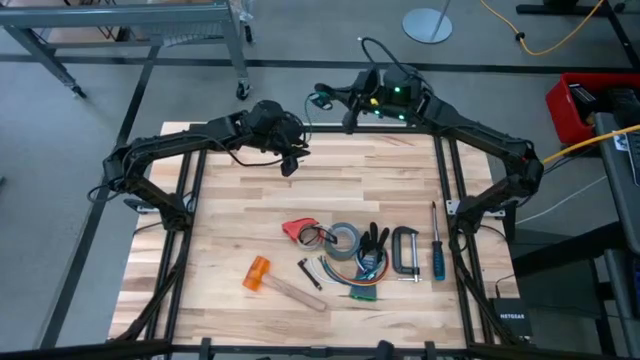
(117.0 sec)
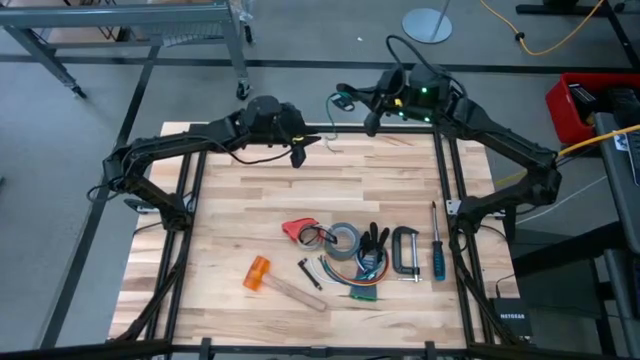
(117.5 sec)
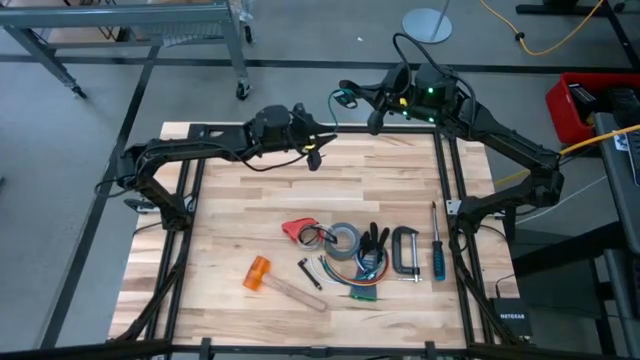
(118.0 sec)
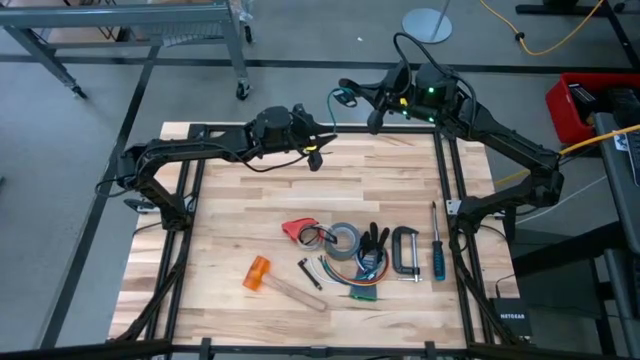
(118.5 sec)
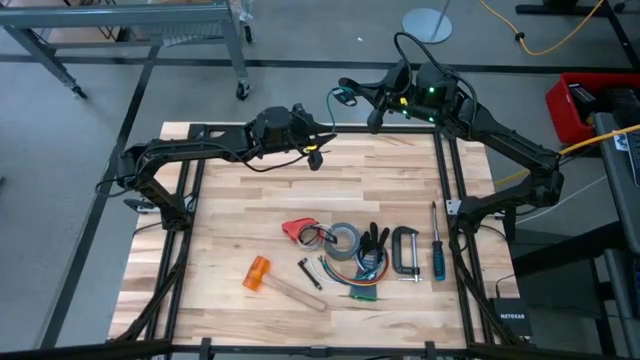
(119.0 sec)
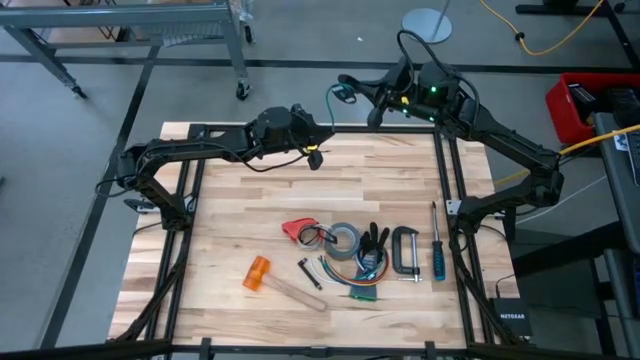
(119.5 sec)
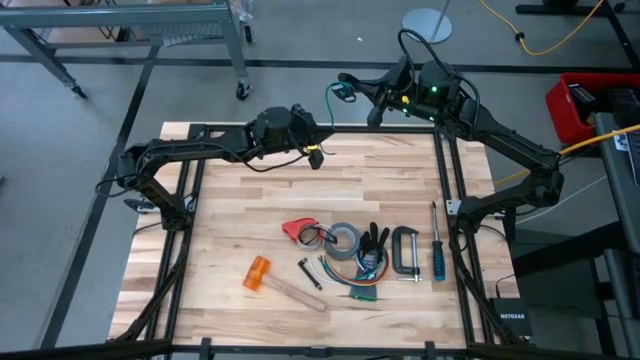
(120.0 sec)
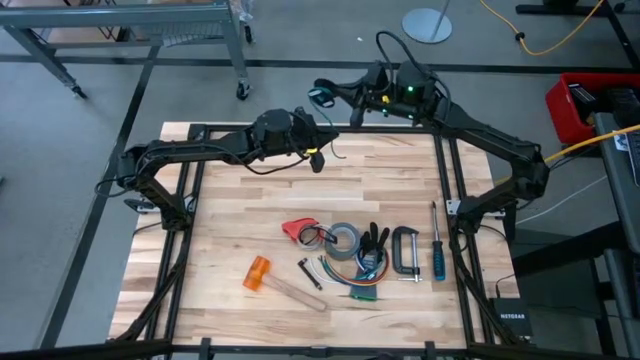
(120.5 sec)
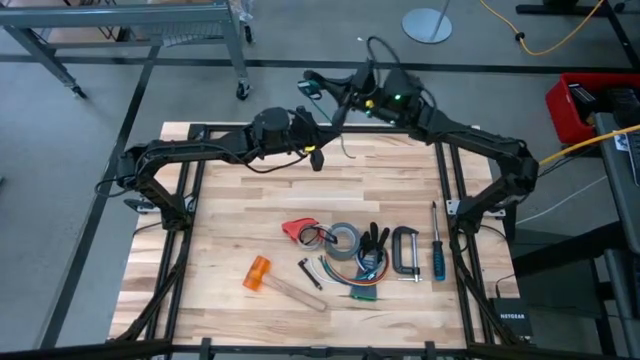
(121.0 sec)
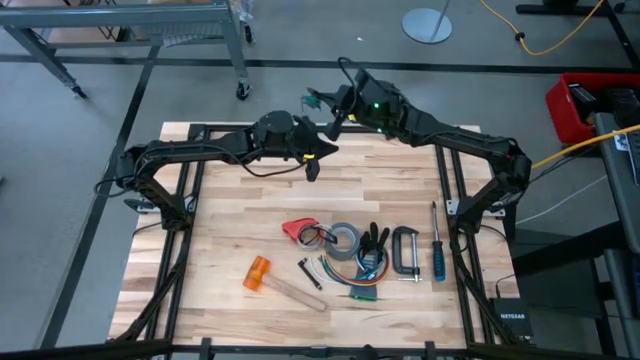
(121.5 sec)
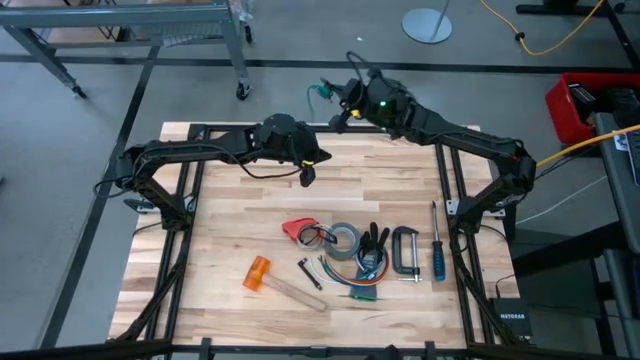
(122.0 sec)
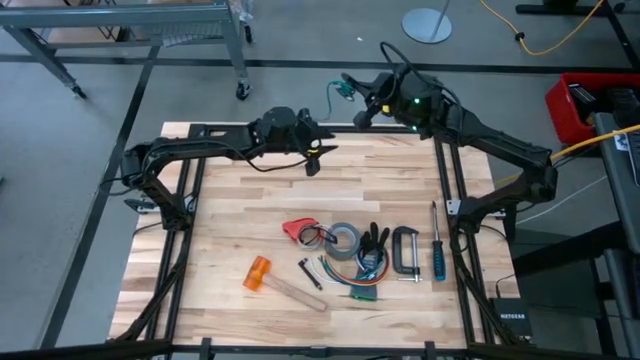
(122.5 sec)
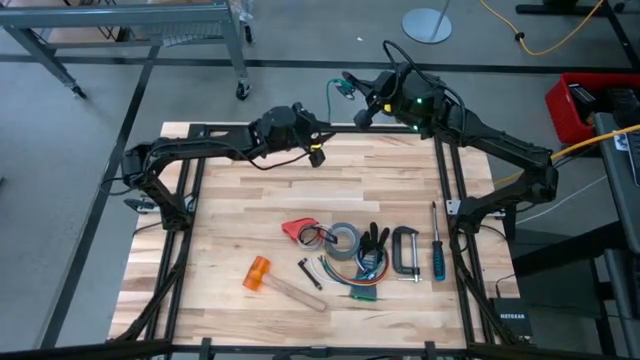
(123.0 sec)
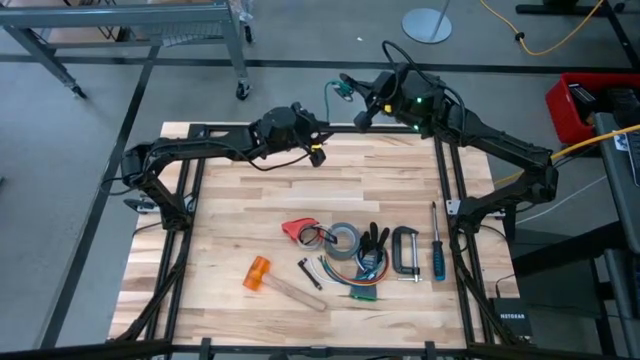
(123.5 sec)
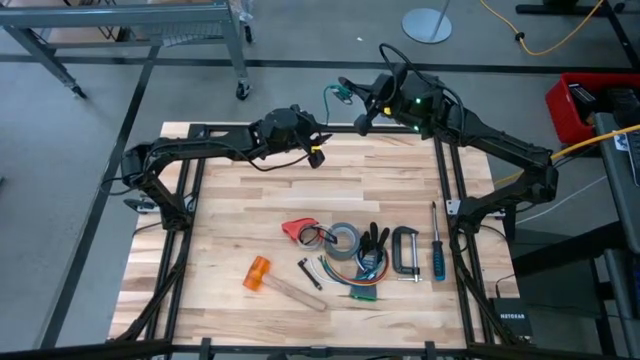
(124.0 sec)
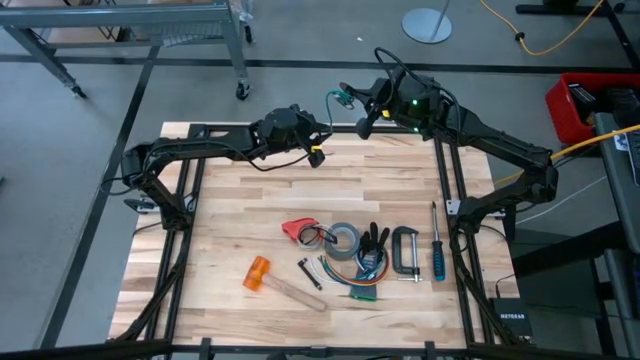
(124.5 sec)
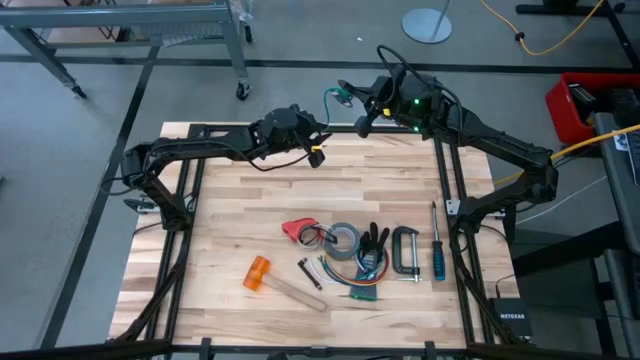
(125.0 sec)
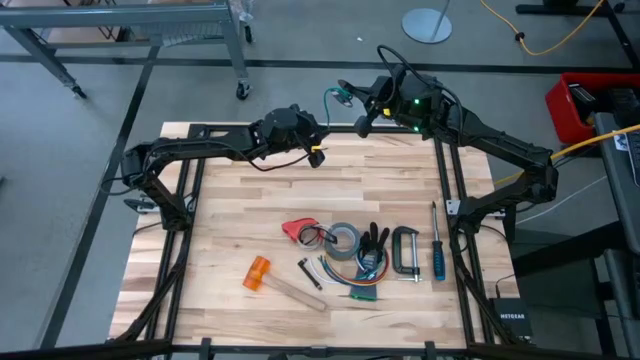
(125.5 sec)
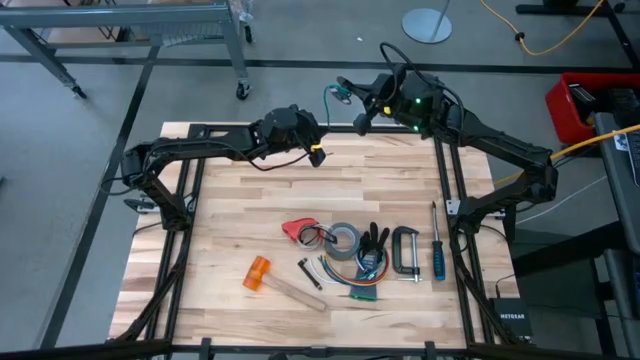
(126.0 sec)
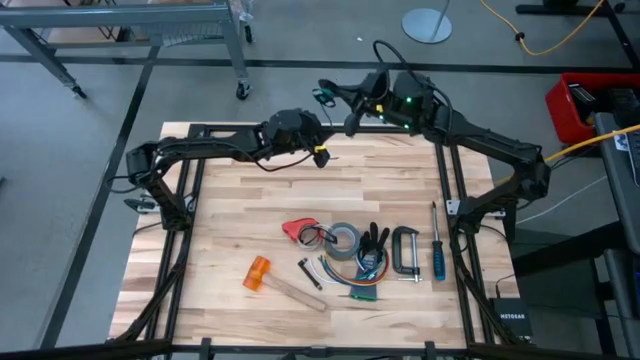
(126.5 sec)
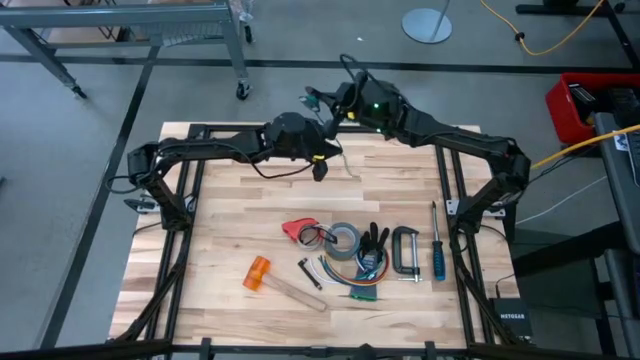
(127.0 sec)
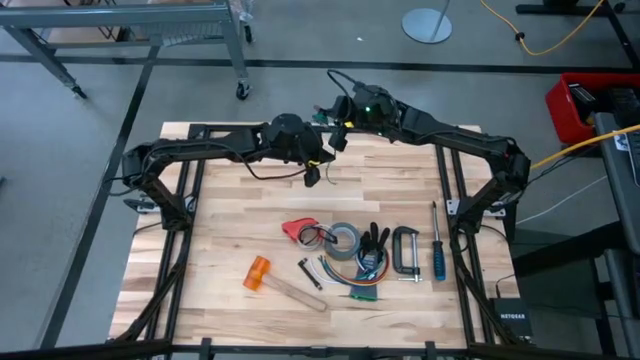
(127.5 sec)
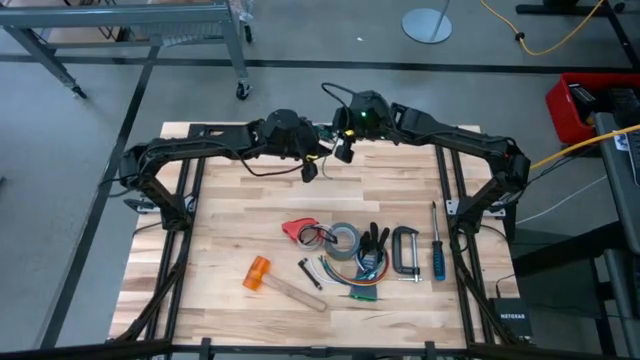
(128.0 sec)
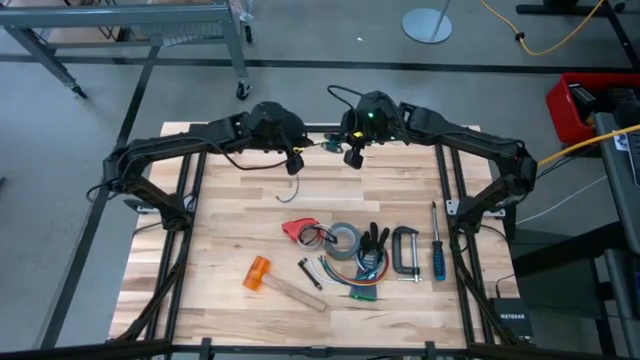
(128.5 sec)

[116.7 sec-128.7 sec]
Task: Coil cords
Coil the green cable wire on the black spool

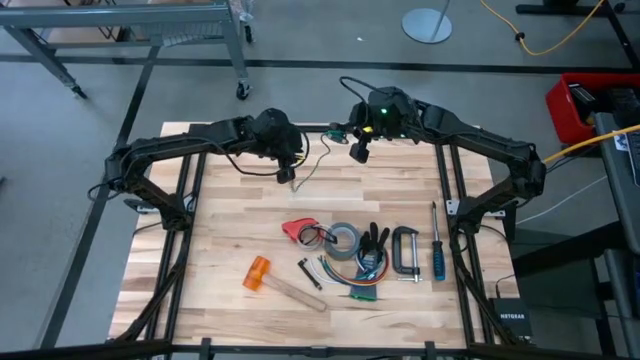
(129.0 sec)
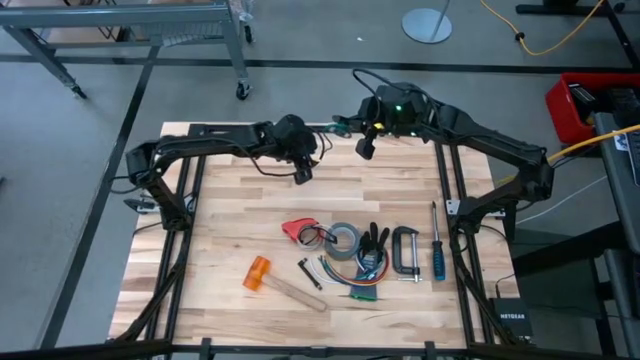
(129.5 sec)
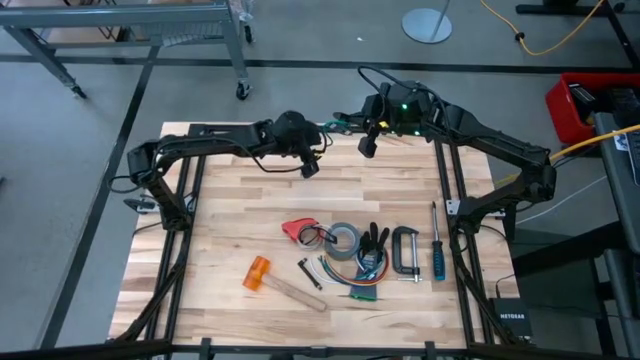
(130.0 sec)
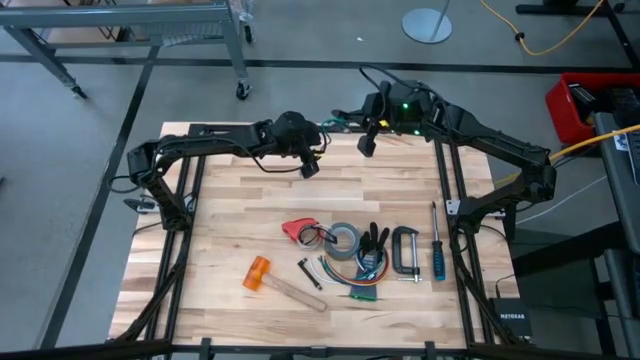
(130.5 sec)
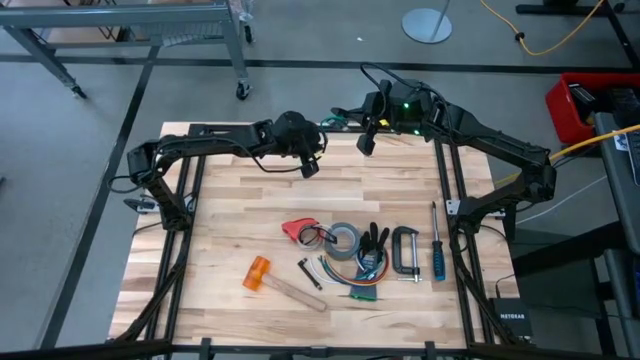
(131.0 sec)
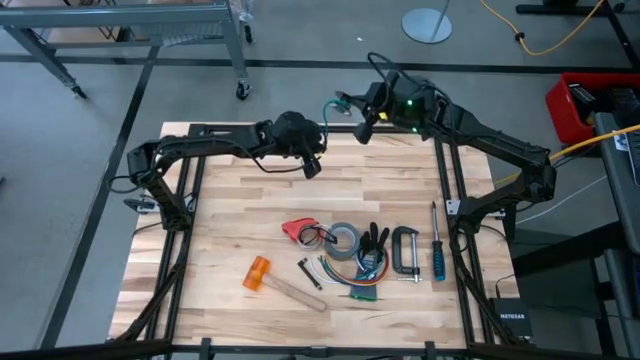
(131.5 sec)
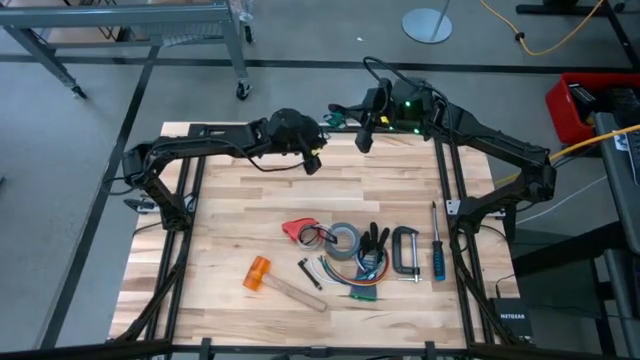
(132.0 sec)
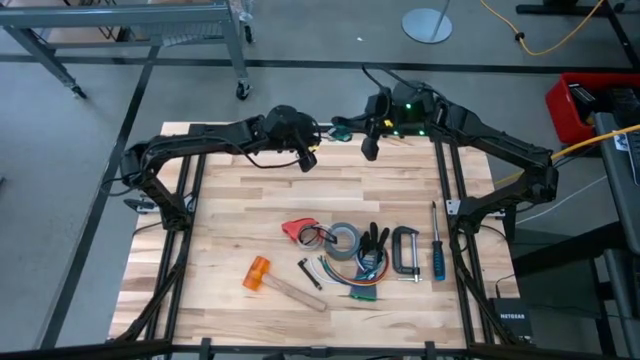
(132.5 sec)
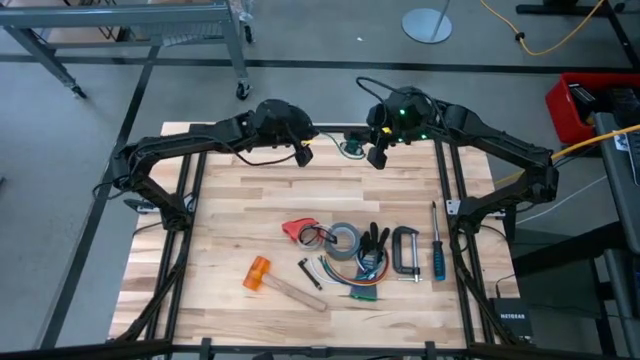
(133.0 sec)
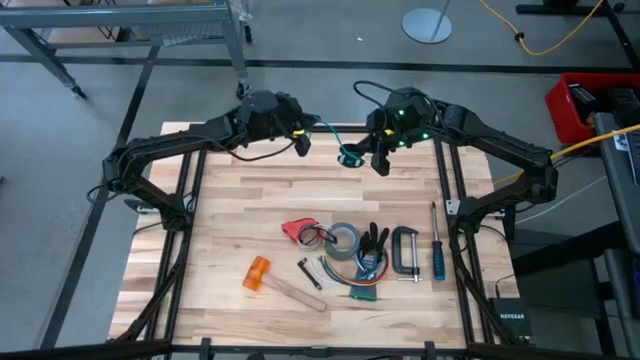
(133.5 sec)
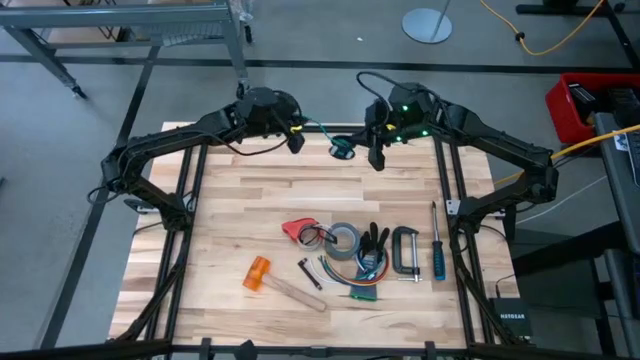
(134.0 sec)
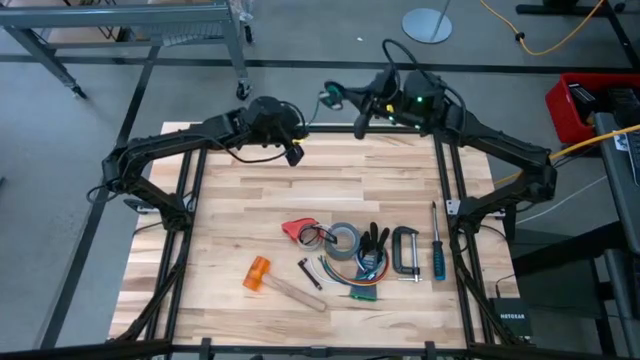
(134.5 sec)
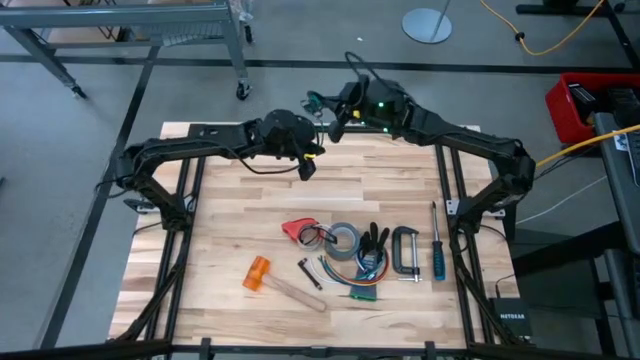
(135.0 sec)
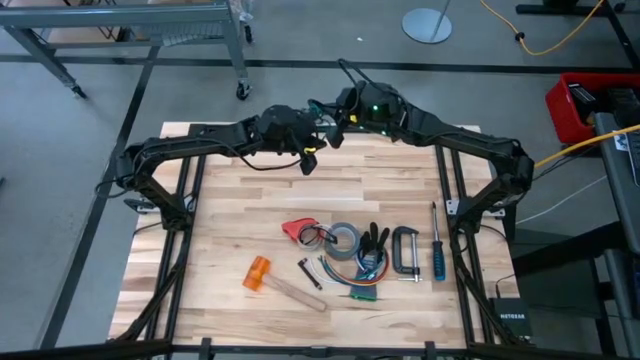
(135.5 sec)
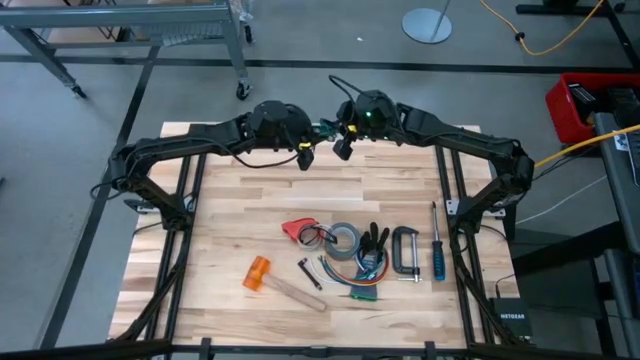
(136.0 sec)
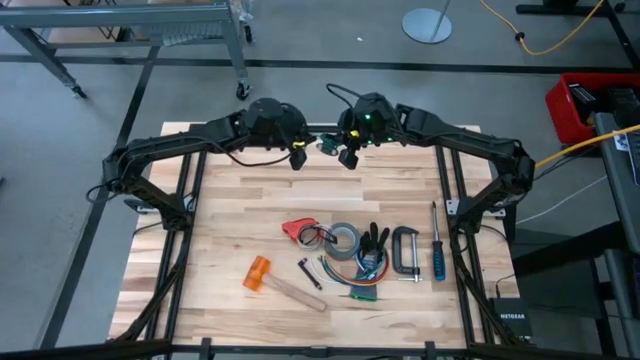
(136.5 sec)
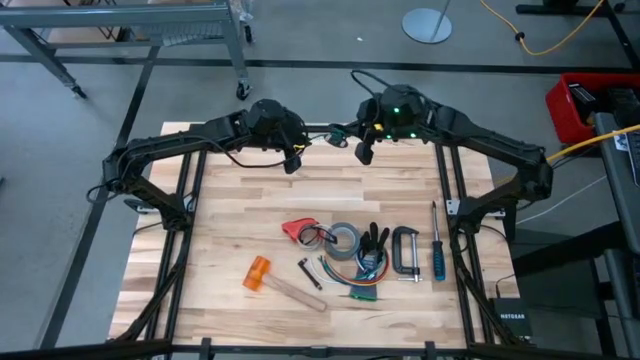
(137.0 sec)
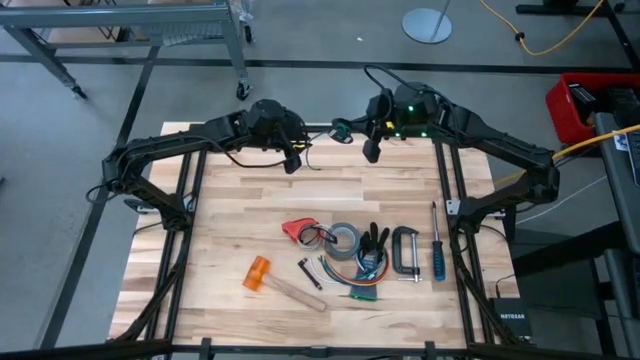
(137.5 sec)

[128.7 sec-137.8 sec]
Coil the green cable wire on the black spool

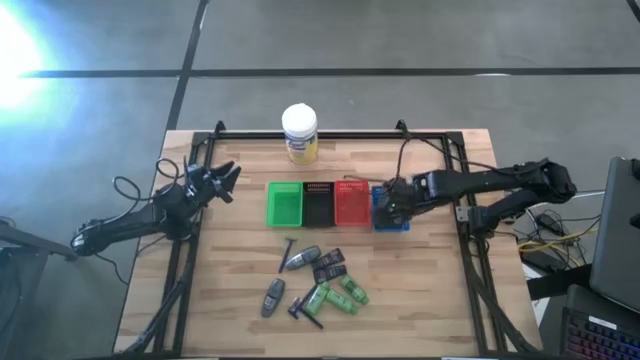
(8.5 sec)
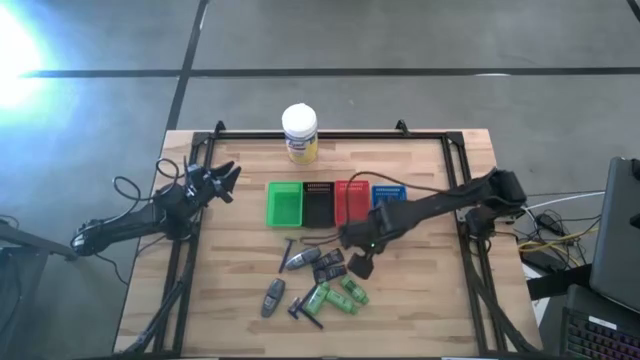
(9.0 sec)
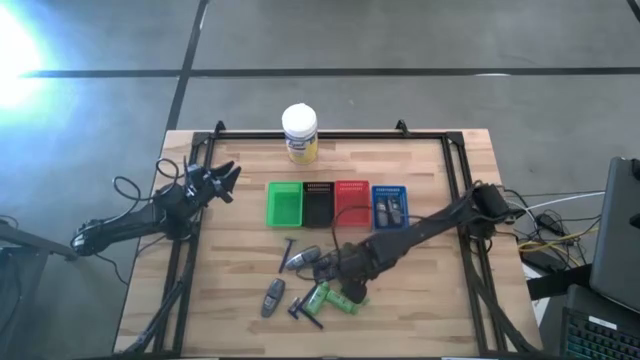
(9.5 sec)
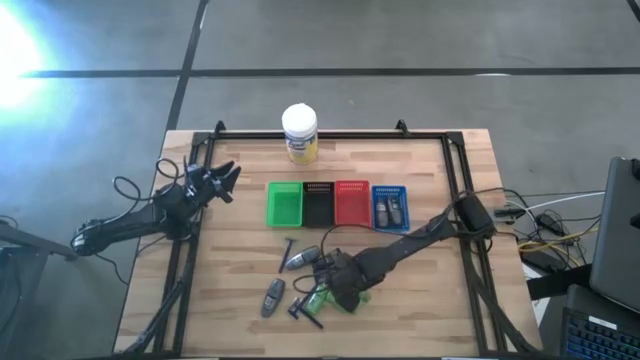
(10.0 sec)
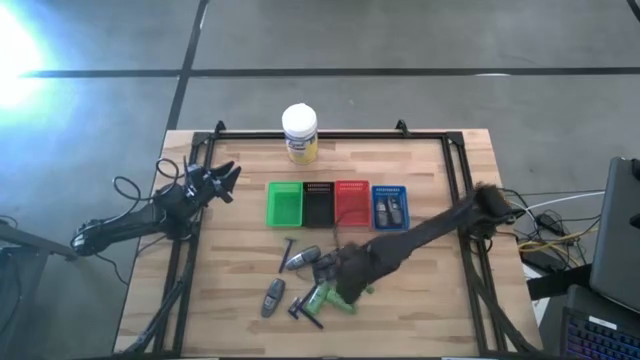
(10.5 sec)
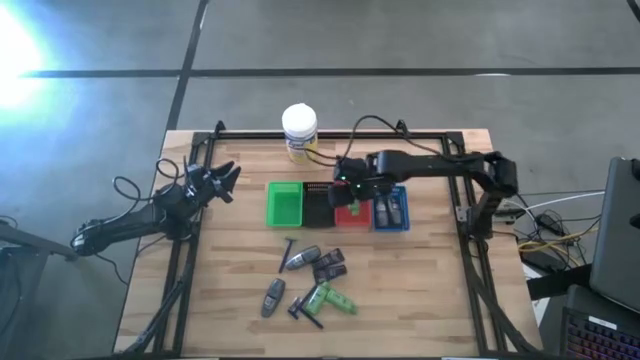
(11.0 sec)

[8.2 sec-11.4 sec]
Task: Pick & Place Travel size toiletries
Put the green shampoo into the red bin
